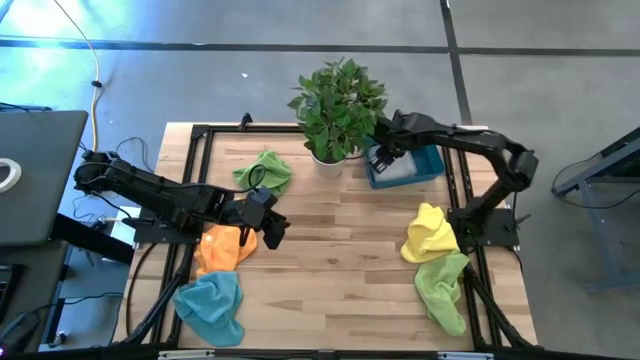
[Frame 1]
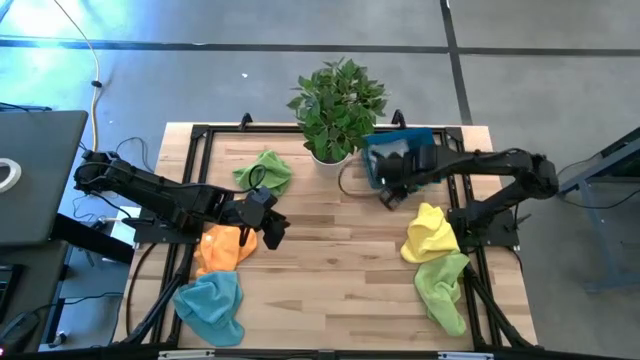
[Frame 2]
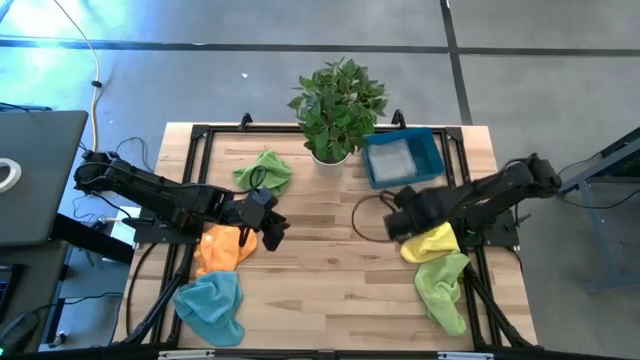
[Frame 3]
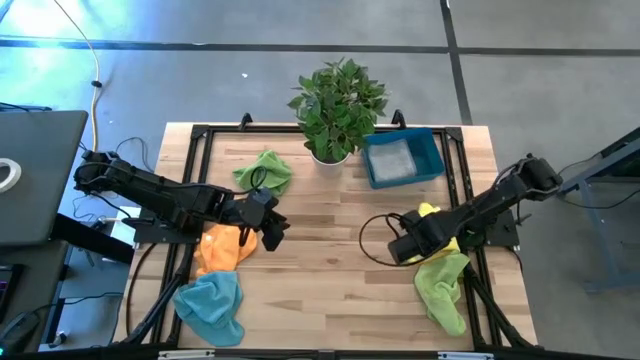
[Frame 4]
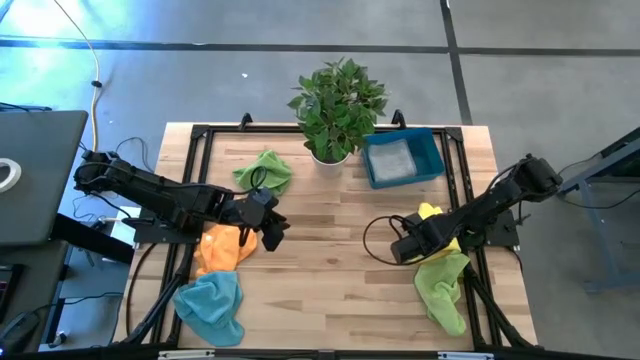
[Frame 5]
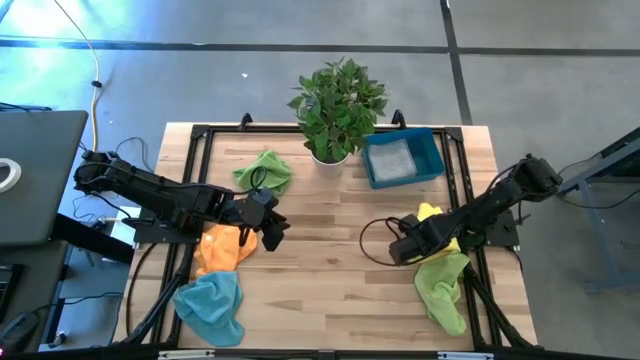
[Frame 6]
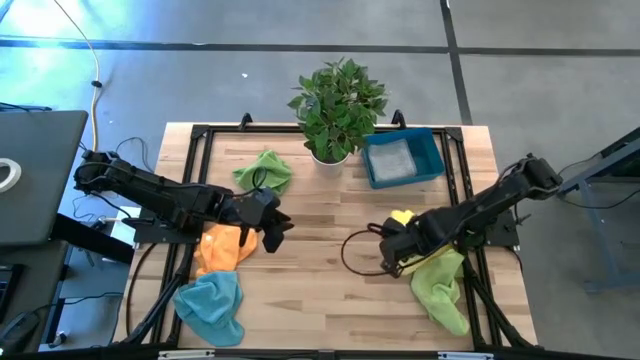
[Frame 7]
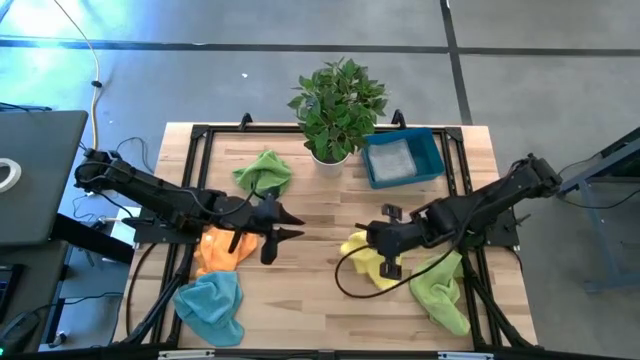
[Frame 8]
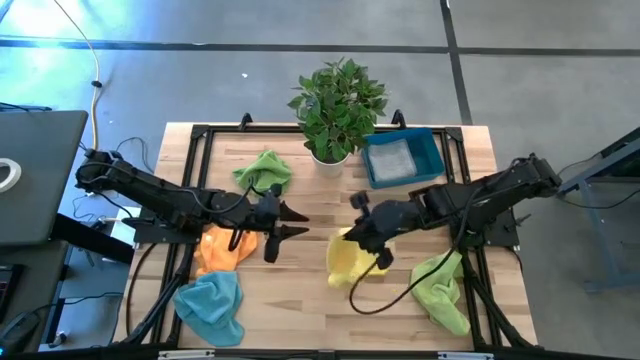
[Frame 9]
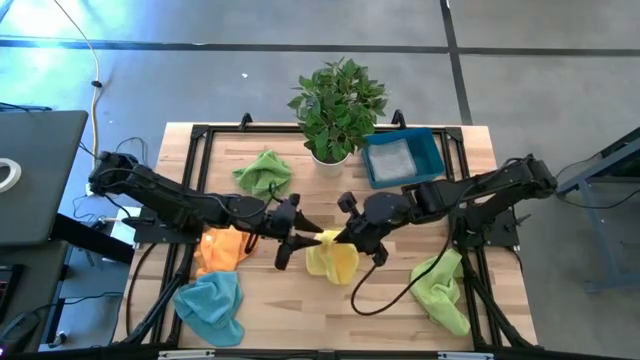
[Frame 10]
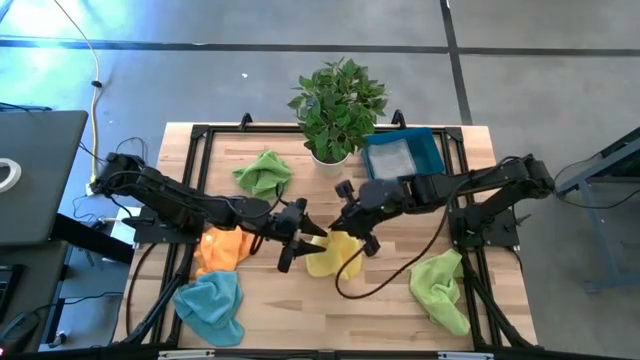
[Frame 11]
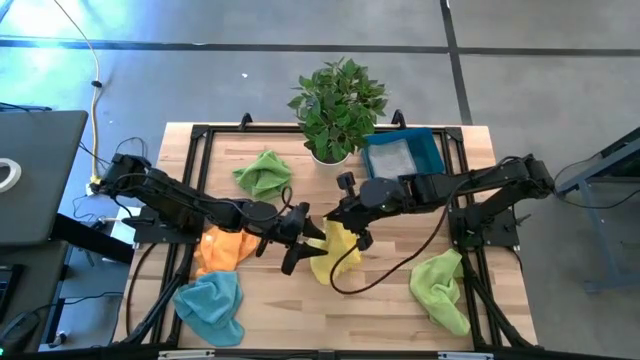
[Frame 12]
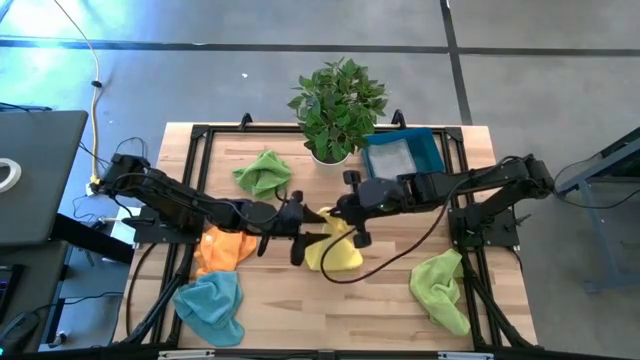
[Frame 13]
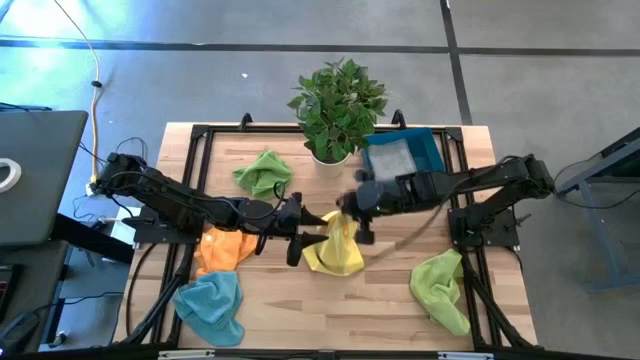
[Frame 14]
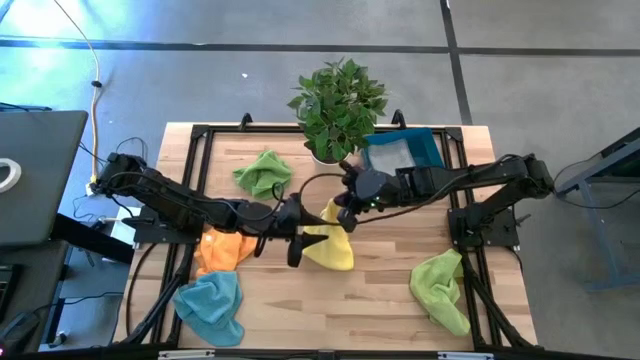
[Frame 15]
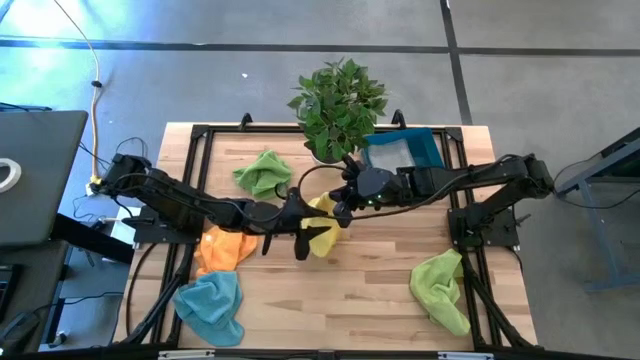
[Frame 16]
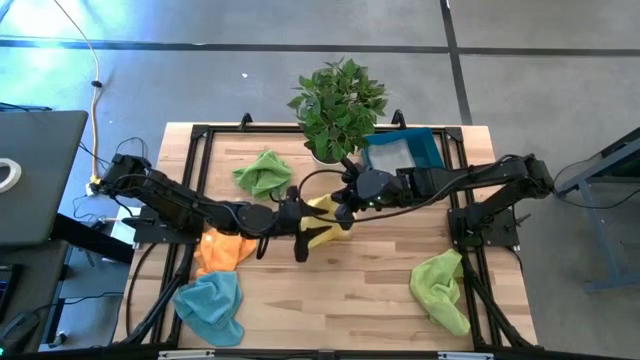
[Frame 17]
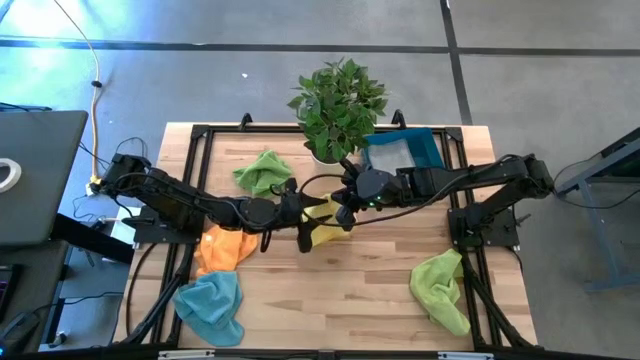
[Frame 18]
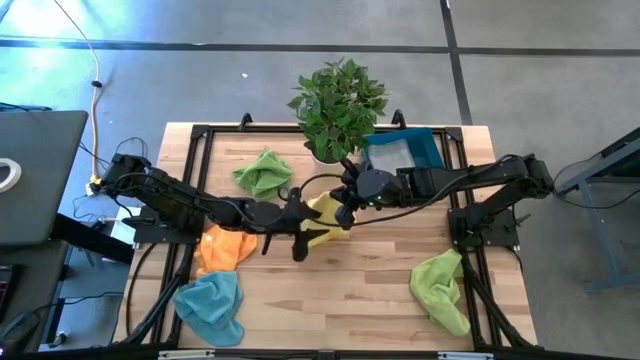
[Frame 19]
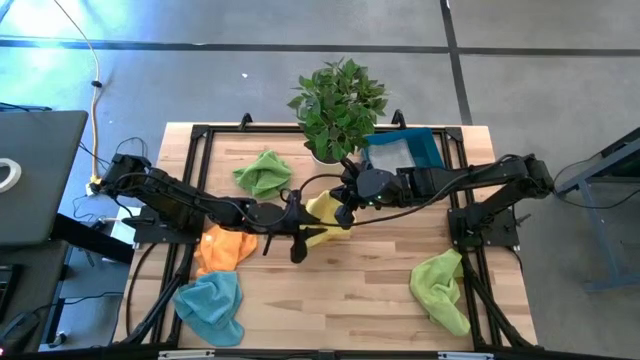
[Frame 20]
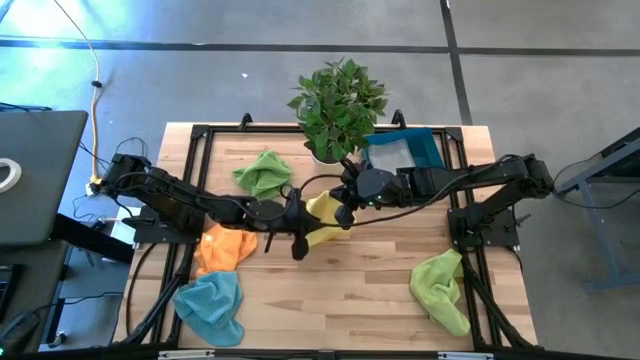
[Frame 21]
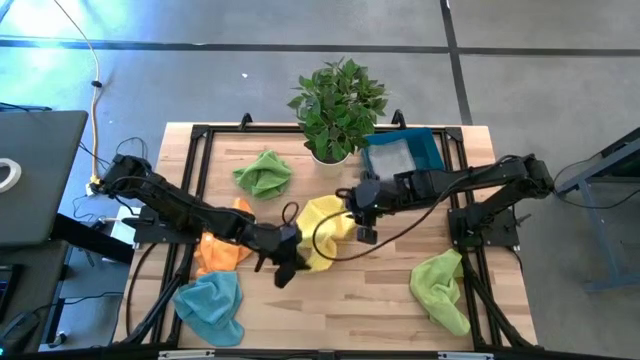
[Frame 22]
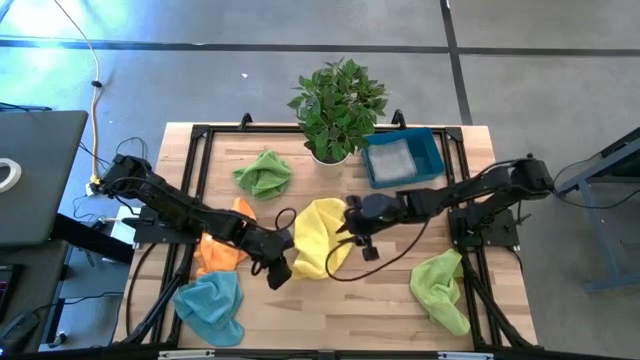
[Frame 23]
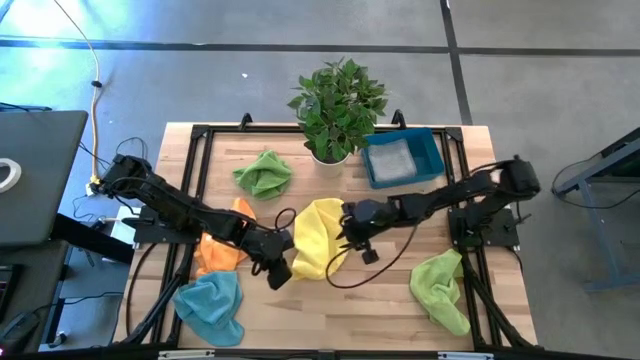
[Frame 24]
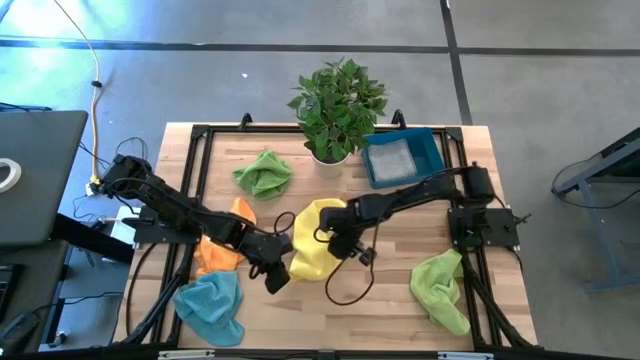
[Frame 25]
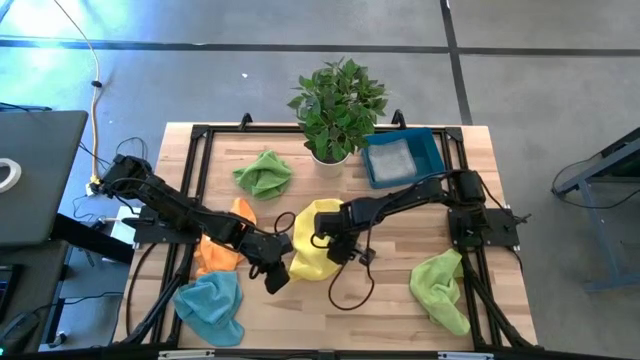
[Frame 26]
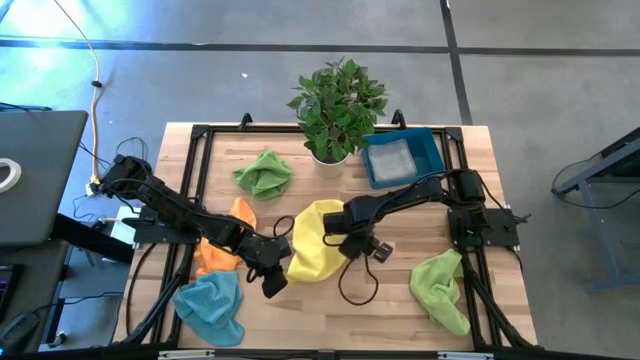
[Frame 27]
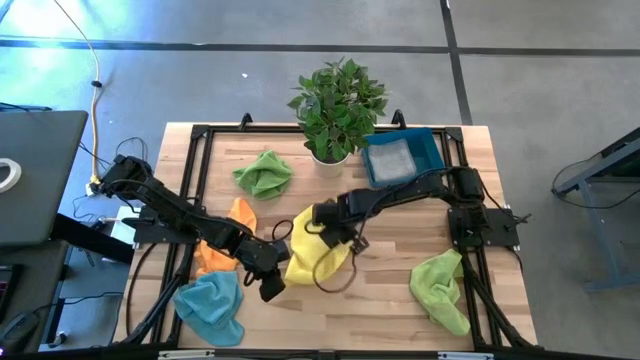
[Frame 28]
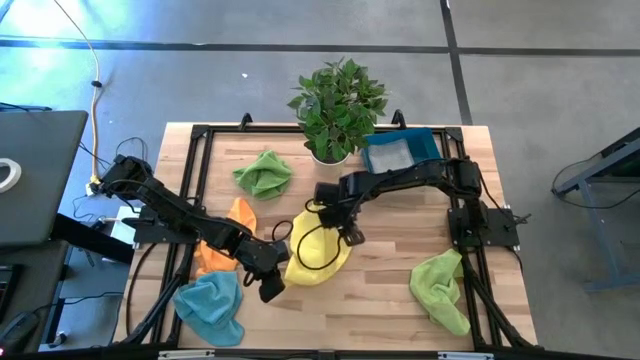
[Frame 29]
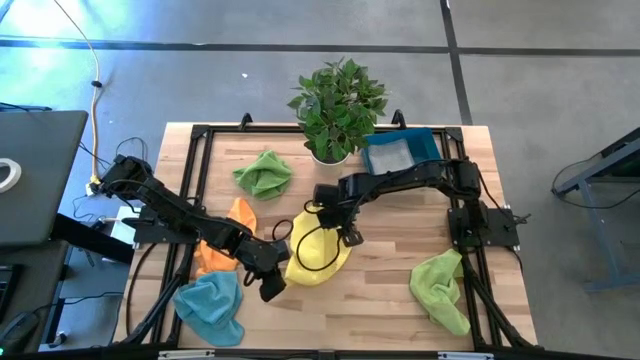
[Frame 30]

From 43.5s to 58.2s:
Task: Sort microfiber towel by color & place in baskets
Fold the yellow towel

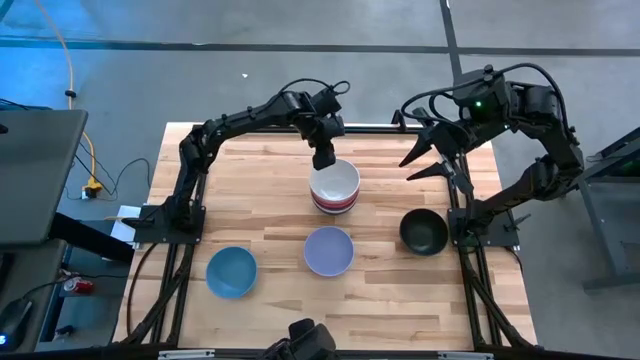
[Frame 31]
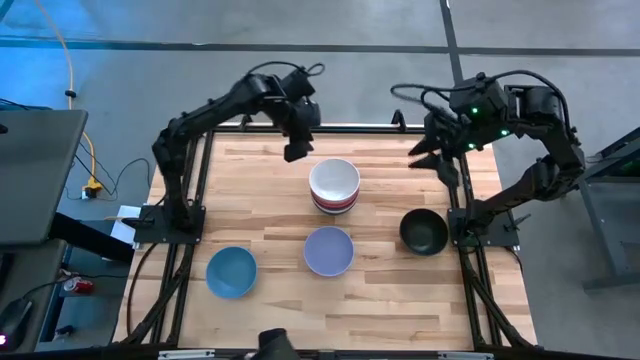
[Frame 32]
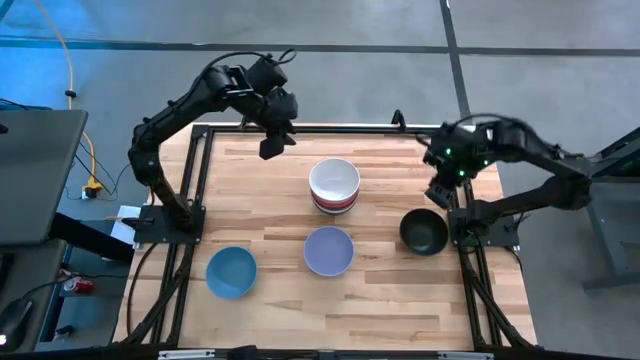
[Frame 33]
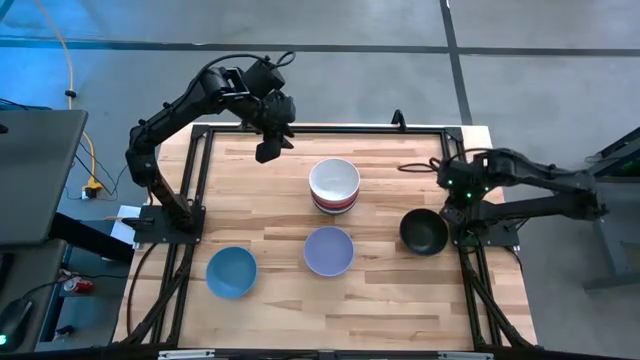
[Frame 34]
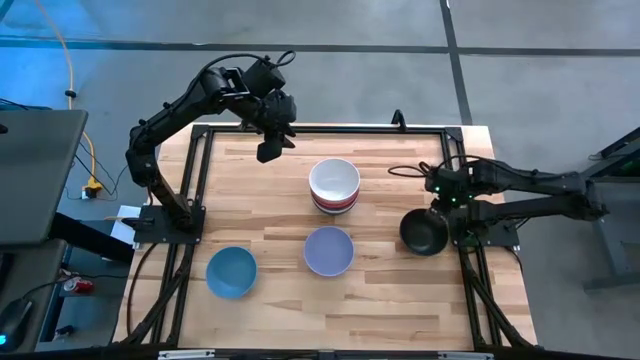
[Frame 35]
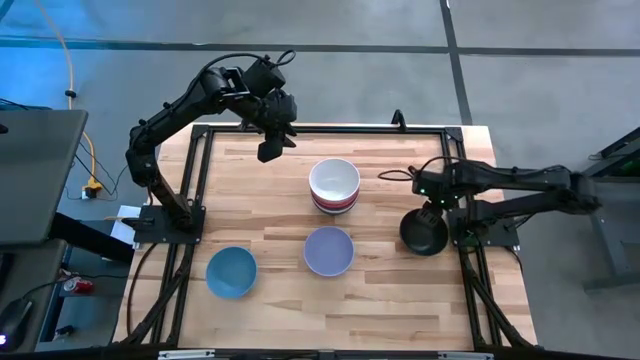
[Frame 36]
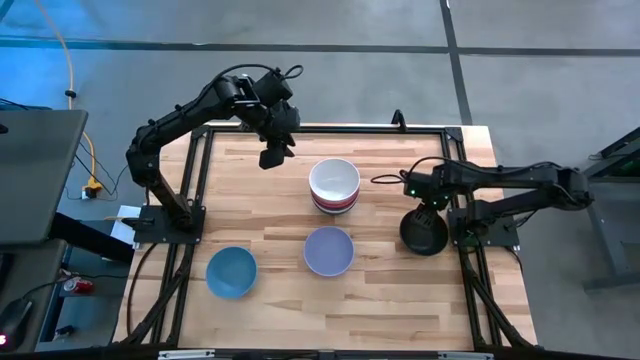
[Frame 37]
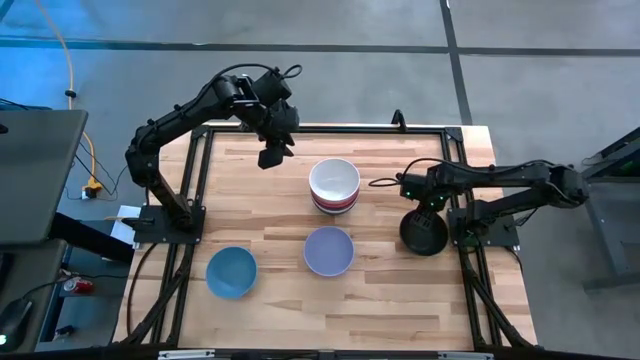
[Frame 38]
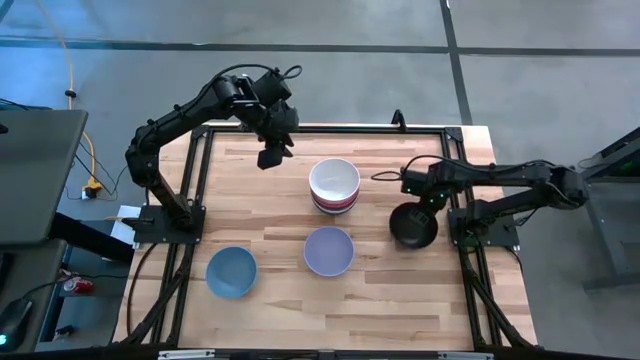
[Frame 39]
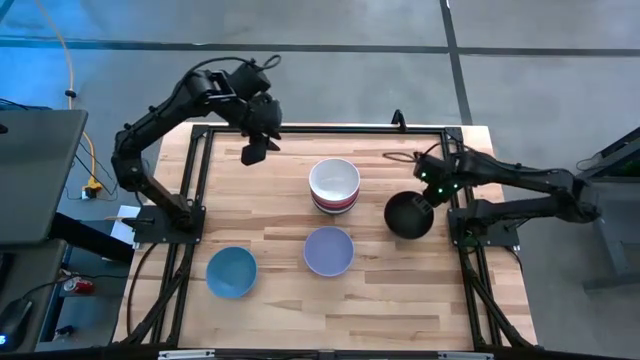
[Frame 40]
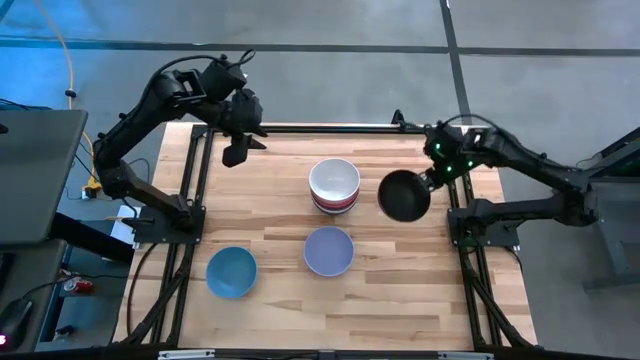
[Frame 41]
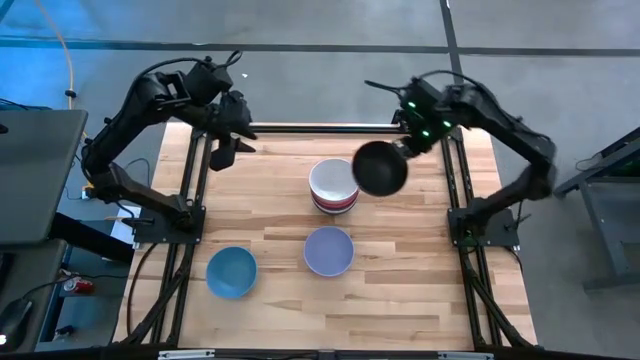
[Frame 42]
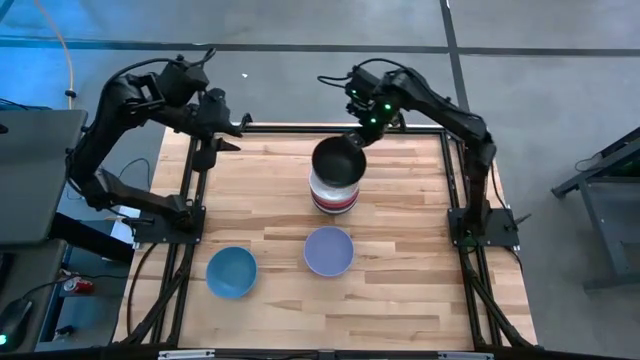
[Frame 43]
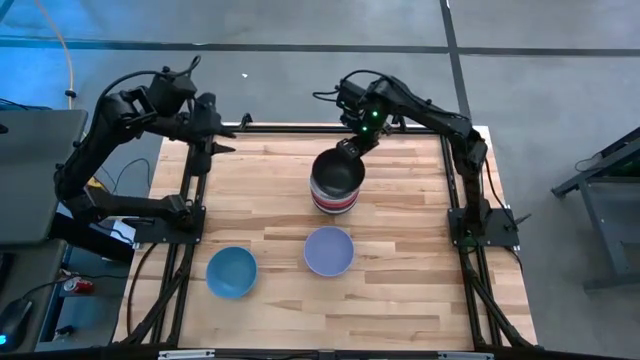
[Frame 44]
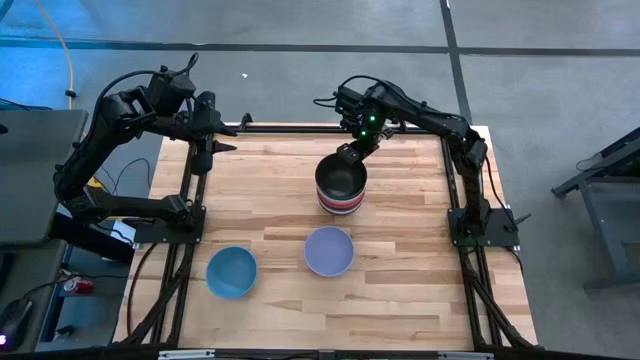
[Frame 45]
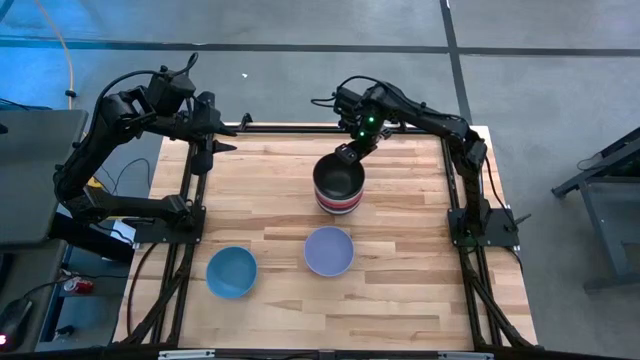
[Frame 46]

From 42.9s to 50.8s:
Task: Nest bowls inside each other
Stack the black bowl on top of the white bowl
